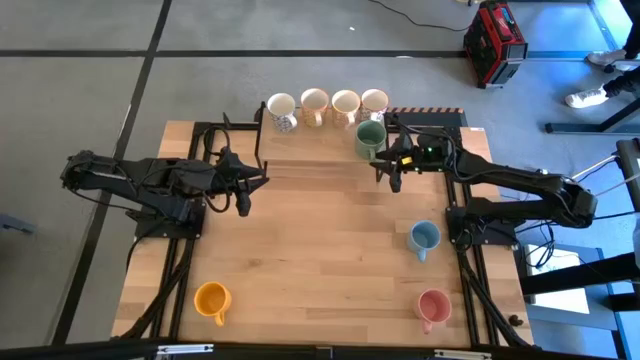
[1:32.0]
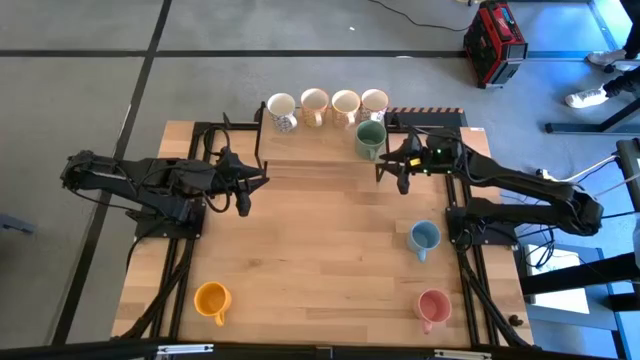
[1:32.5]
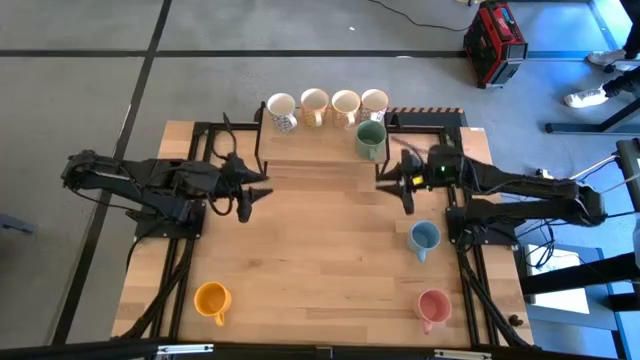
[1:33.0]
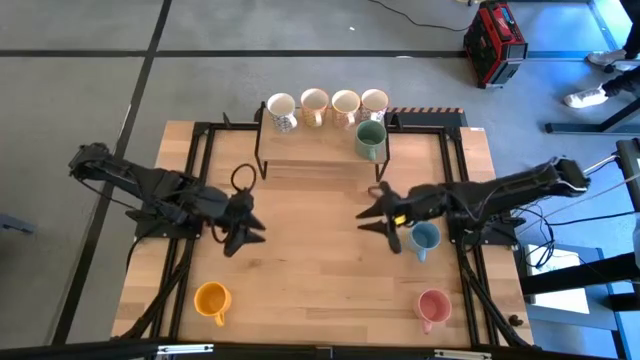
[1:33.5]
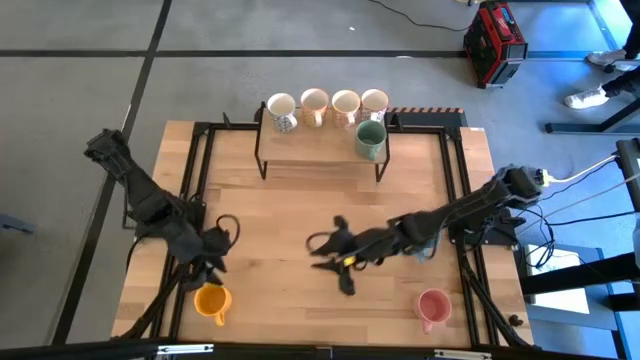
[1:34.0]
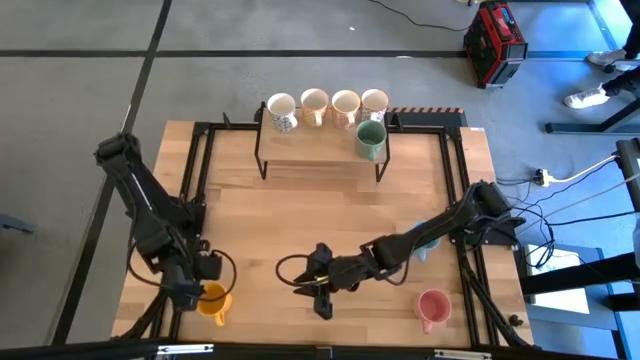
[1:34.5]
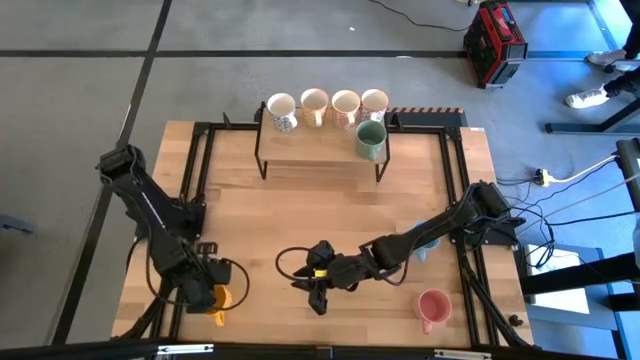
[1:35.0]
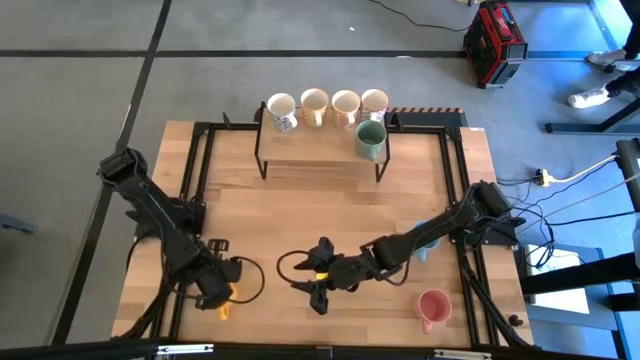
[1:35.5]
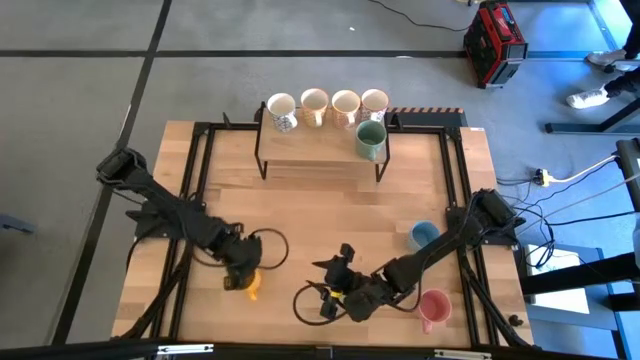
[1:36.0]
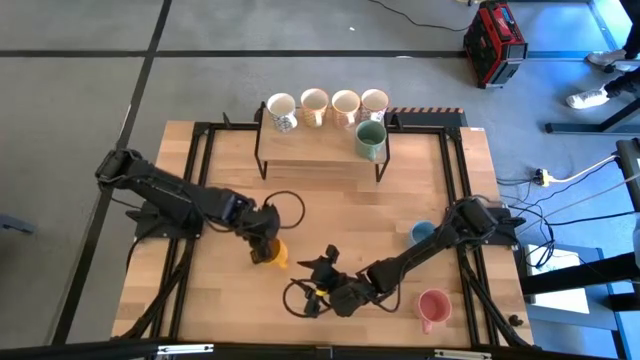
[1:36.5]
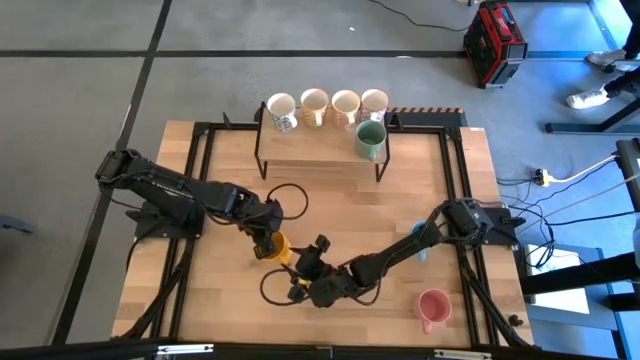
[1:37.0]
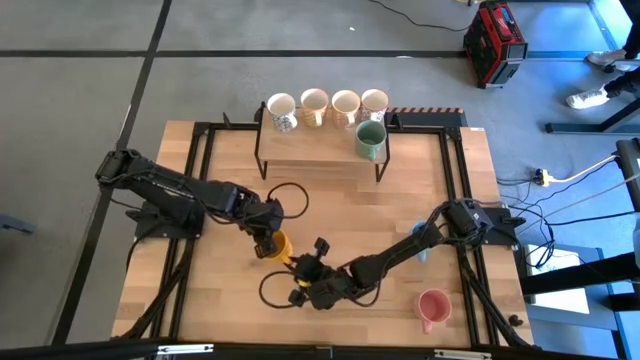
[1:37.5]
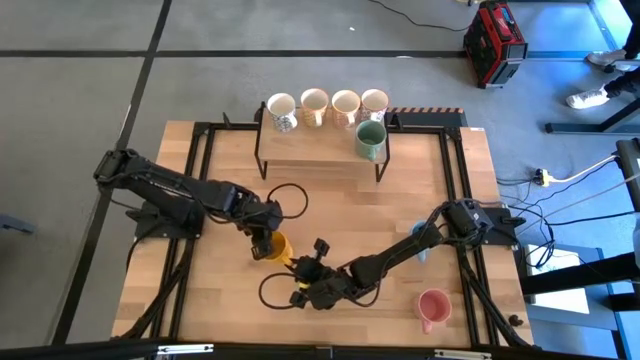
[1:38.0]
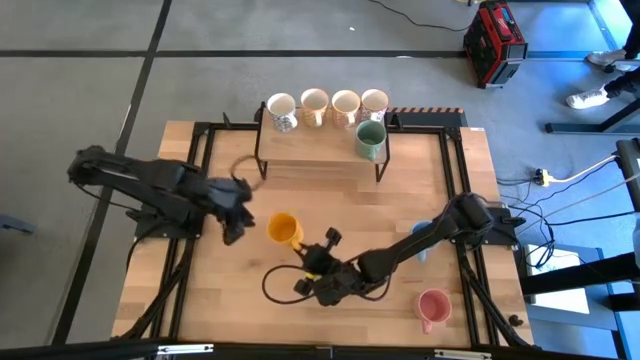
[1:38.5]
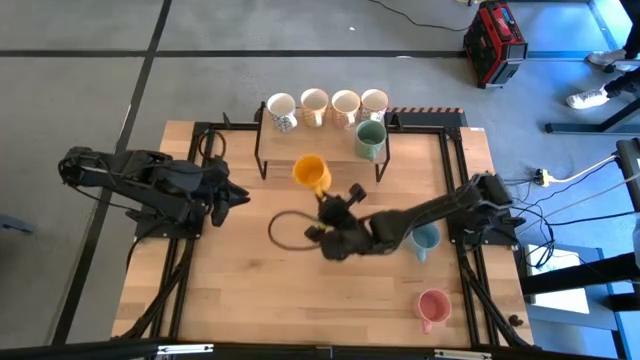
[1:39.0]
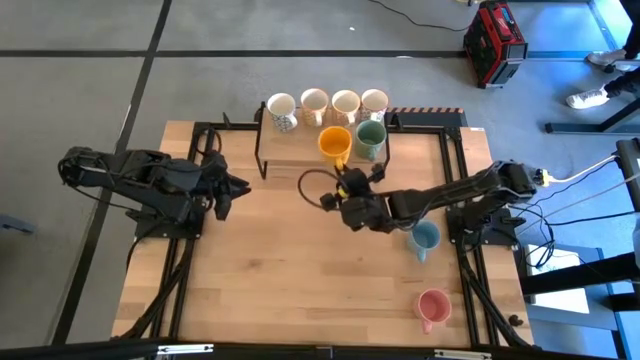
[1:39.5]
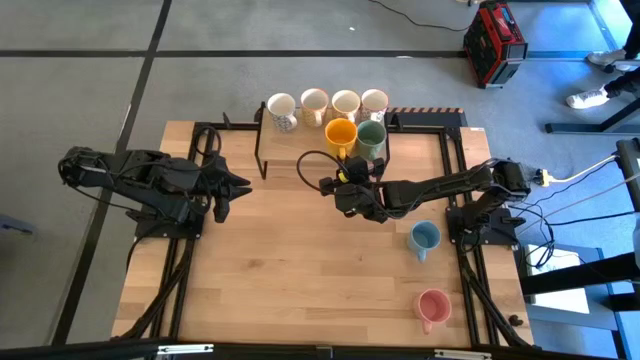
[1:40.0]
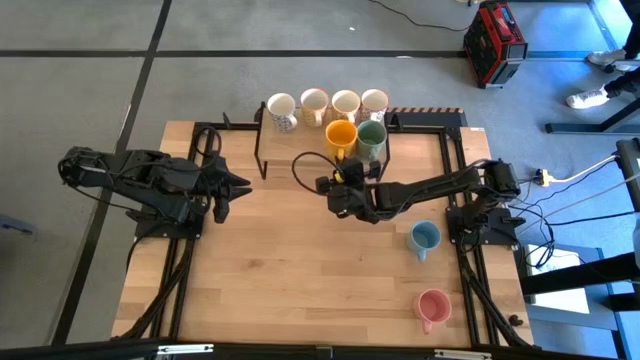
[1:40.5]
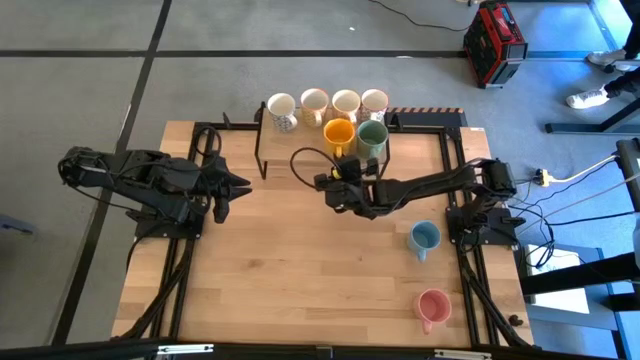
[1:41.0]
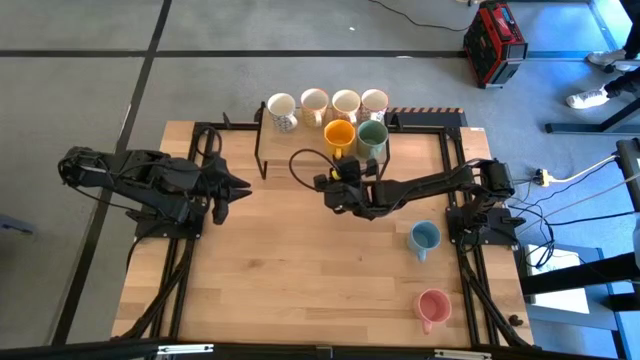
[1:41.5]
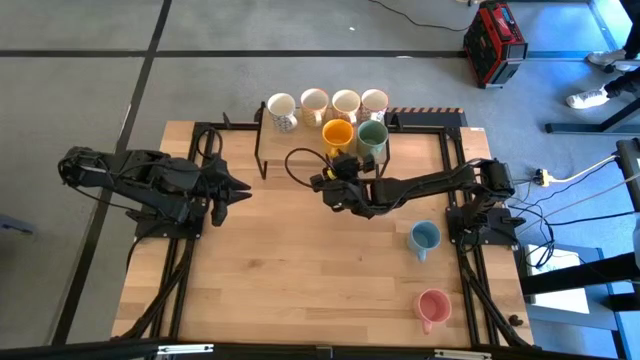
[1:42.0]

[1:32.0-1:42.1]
Task: Place coffee mugs
Put the yellow mug on the shelf

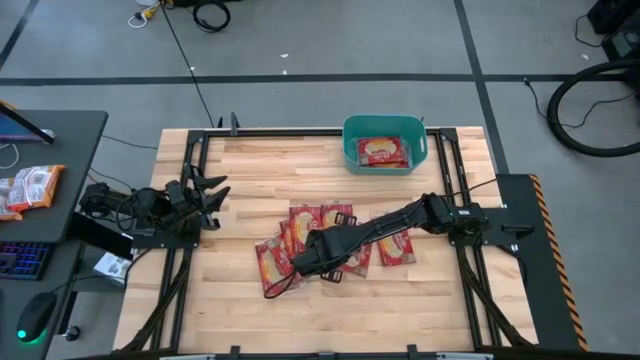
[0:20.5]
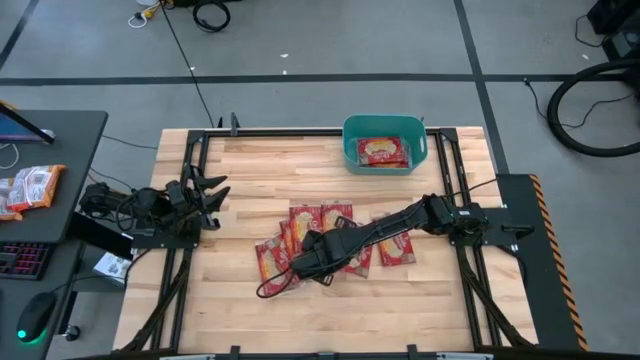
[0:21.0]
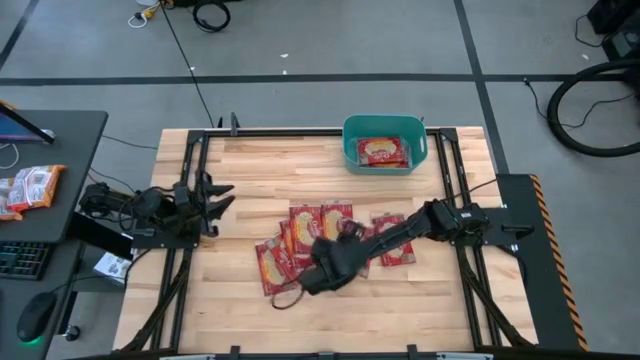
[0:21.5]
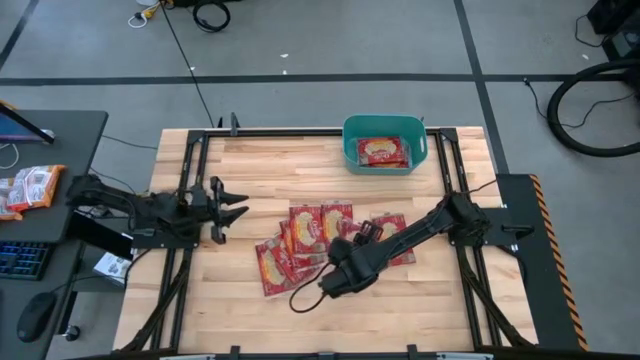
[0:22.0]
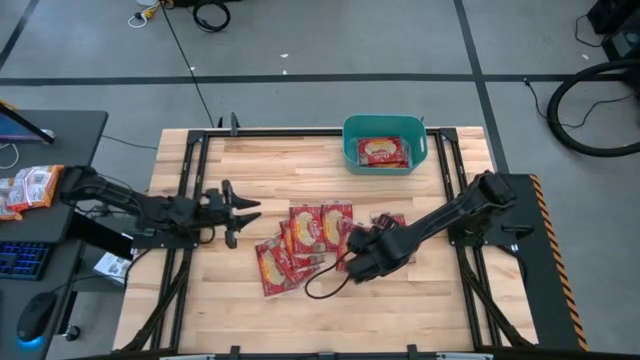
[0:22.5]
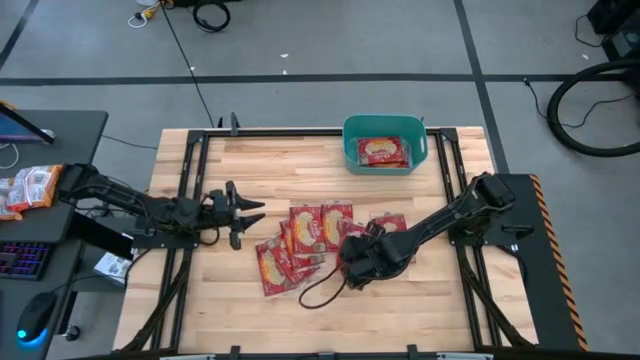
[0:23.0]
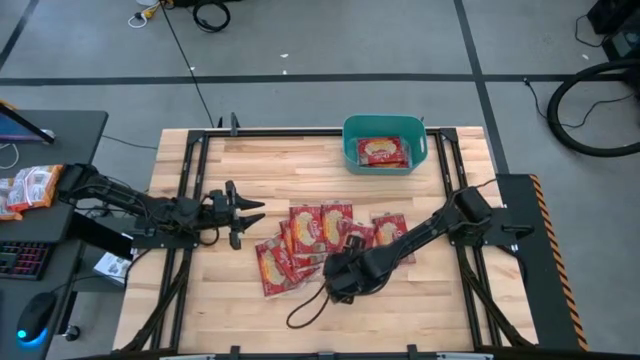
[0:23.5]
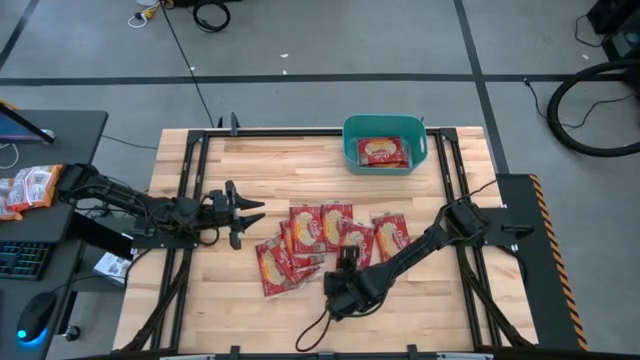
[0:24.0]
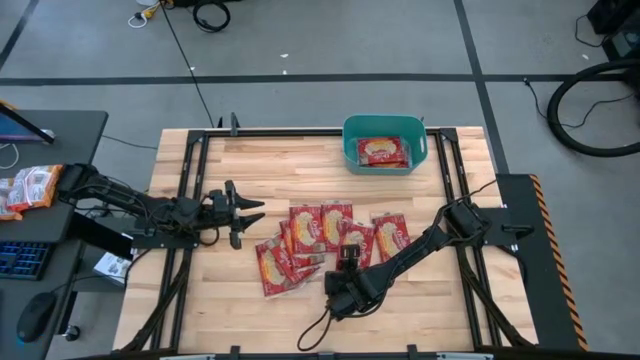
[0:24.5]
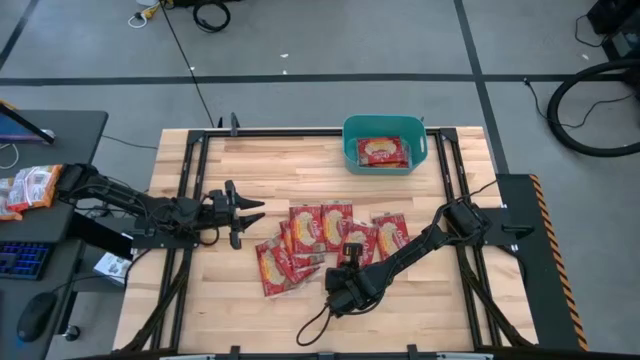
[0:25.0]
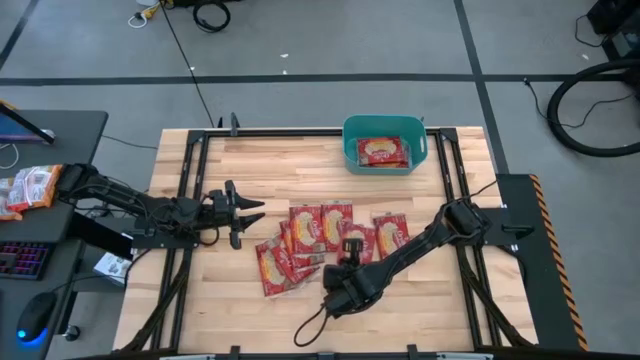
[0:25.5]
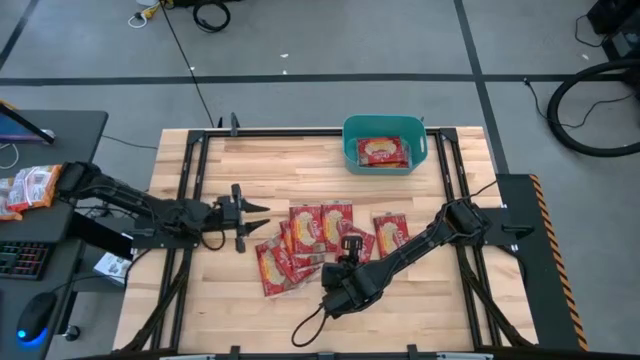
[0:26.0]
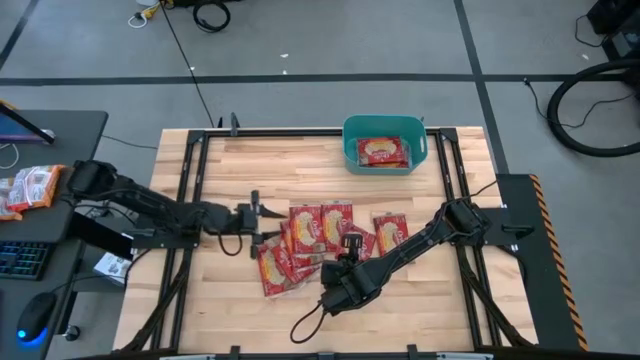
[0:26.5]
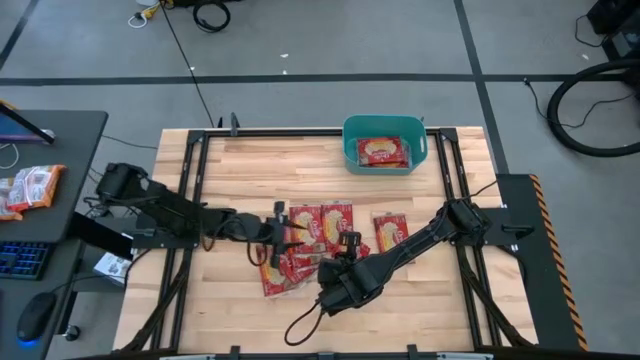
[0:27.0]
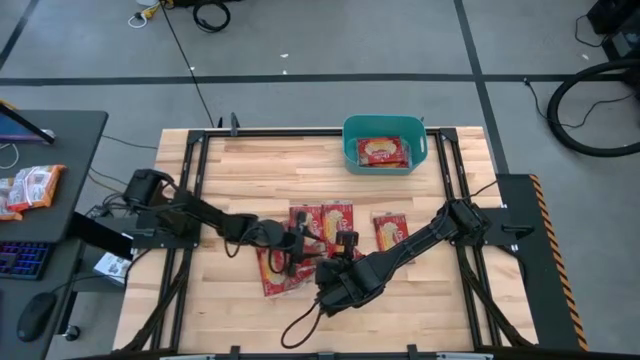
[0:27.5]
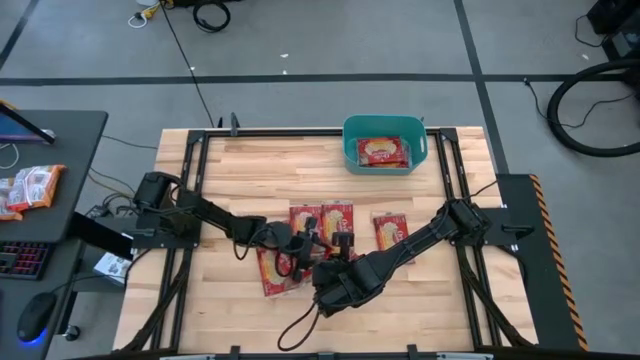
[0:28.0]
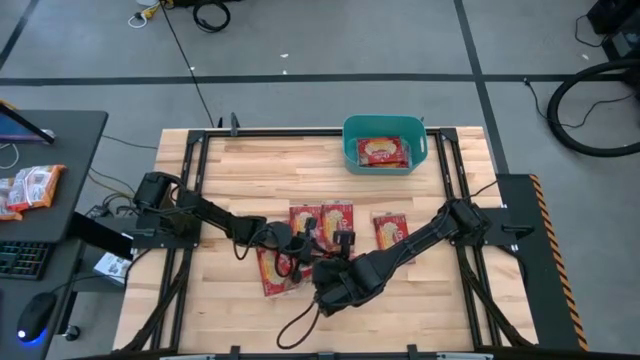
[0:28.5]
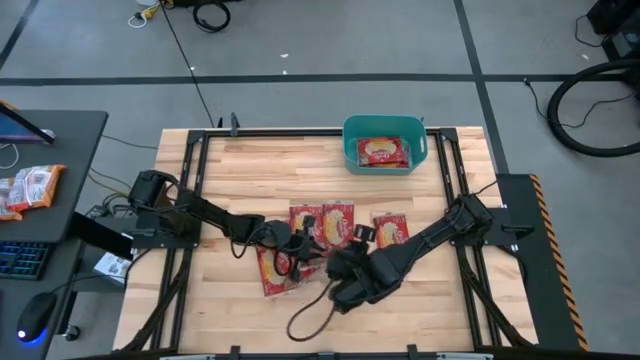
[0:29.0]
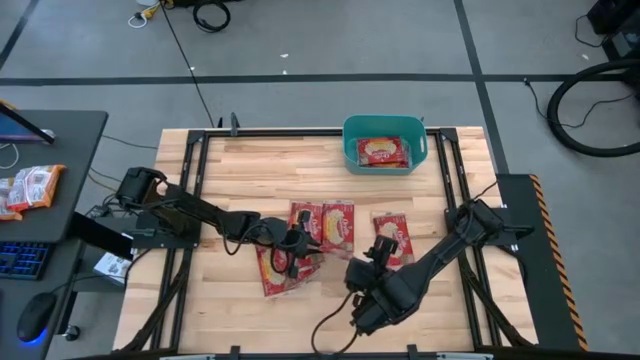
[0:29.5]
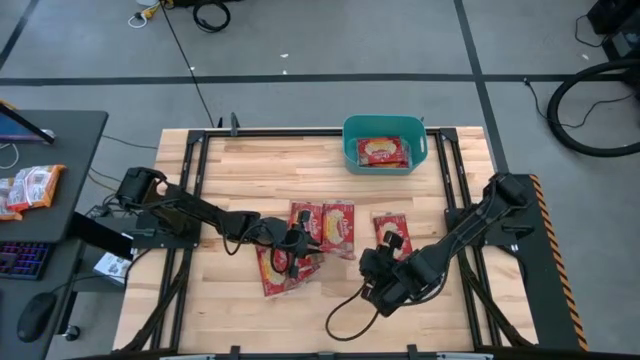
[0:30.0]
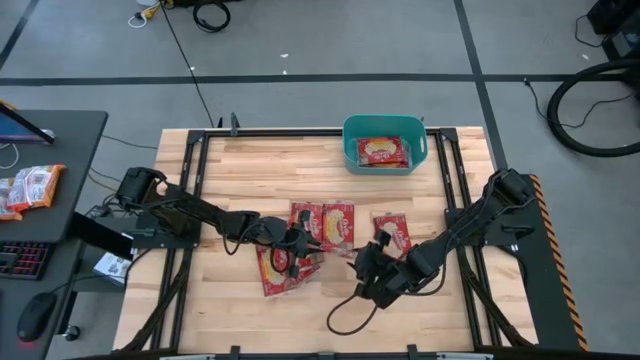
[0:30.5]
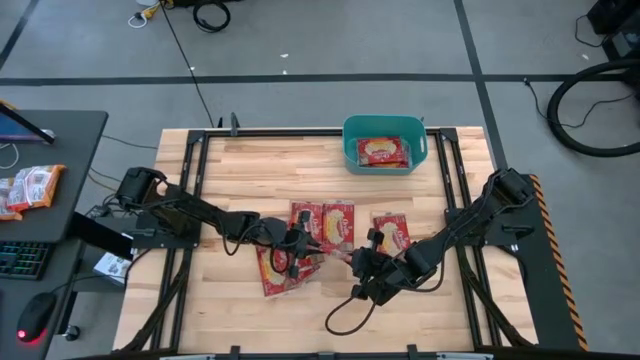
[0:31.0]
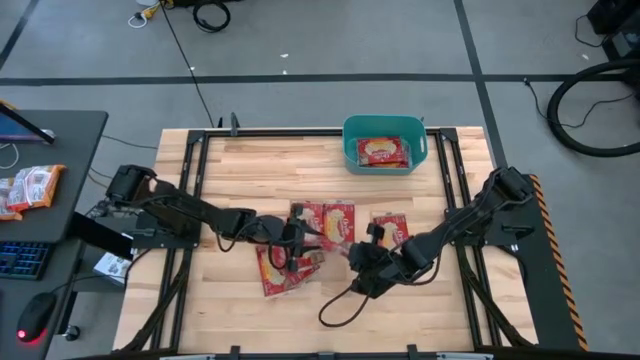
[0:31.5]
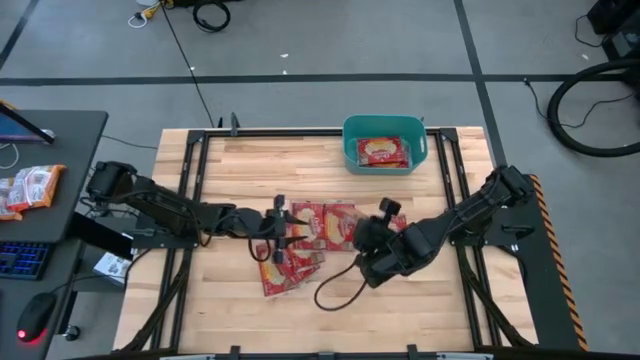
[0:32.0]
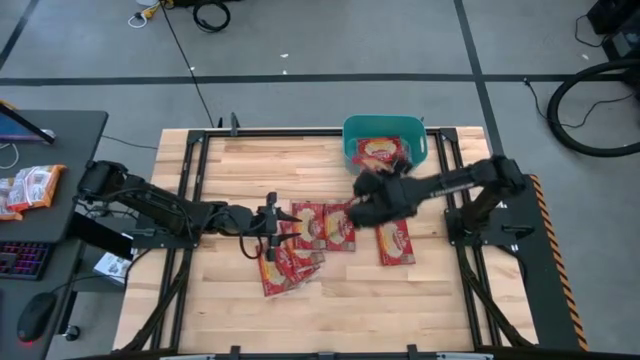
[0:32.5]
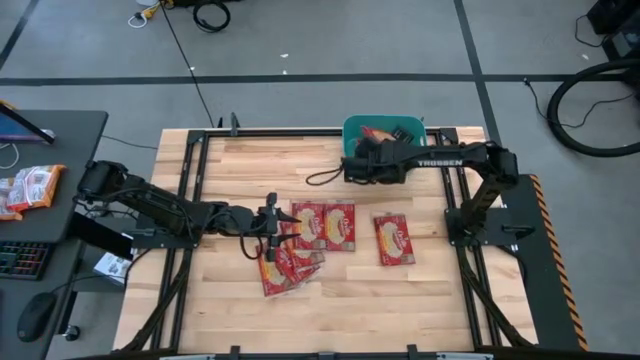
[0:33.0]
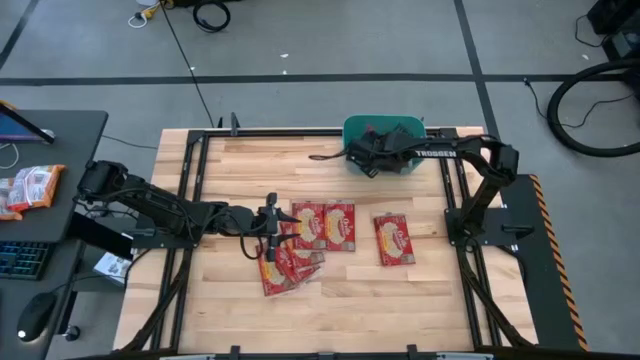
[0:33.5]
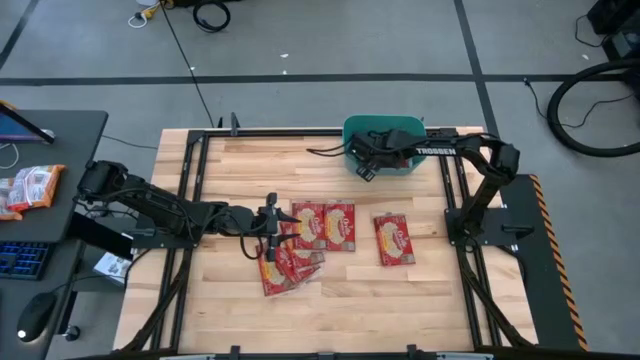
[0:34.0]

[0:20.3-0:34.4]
Task: Sort popcorn bags into baskets
Put the popcorn bag into the green bin
